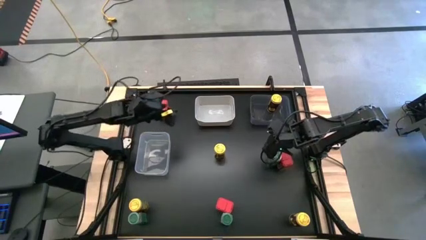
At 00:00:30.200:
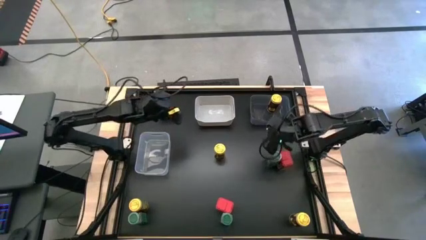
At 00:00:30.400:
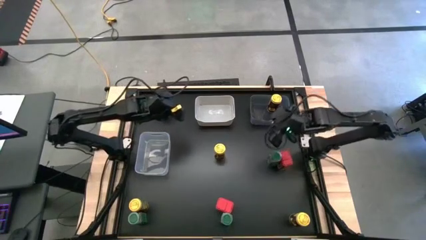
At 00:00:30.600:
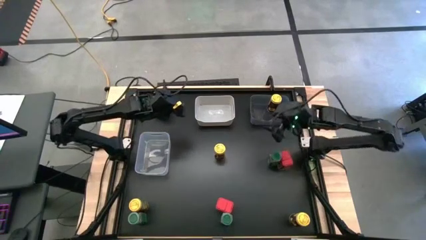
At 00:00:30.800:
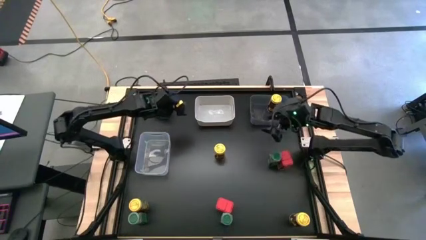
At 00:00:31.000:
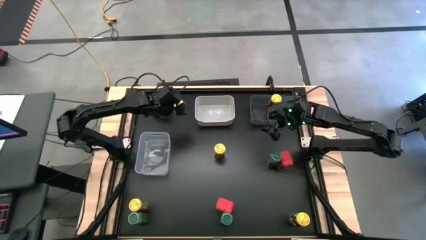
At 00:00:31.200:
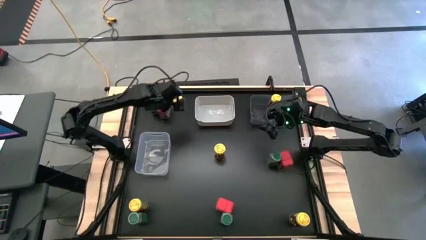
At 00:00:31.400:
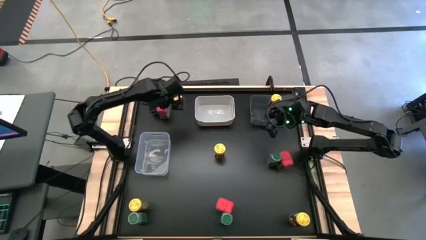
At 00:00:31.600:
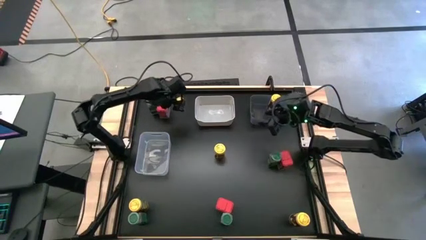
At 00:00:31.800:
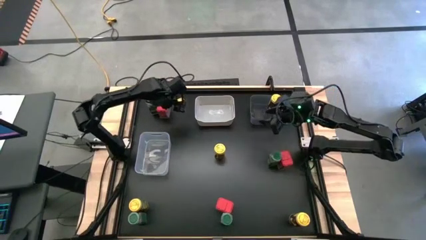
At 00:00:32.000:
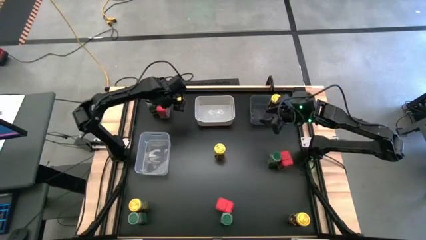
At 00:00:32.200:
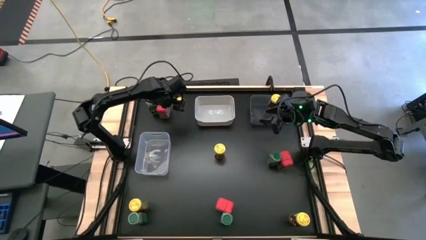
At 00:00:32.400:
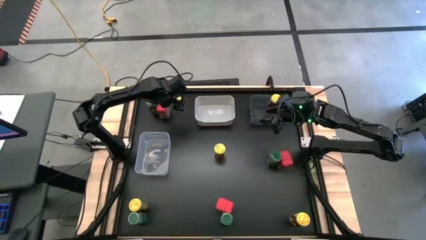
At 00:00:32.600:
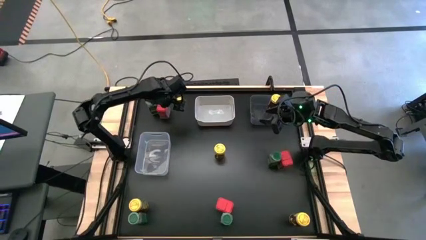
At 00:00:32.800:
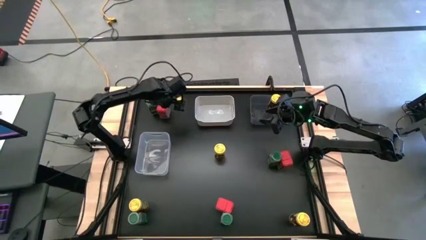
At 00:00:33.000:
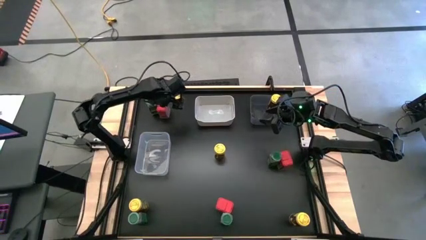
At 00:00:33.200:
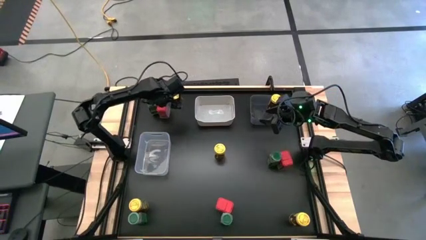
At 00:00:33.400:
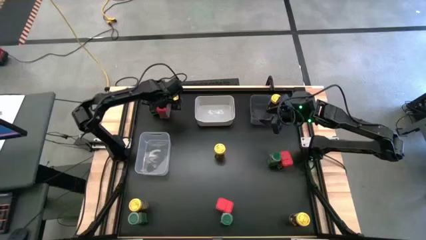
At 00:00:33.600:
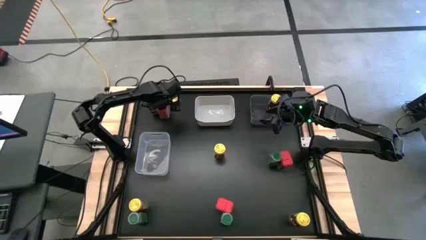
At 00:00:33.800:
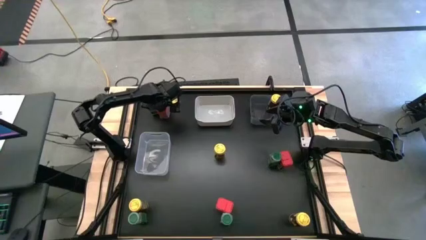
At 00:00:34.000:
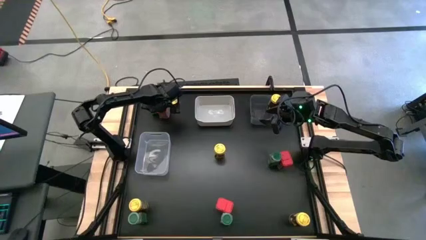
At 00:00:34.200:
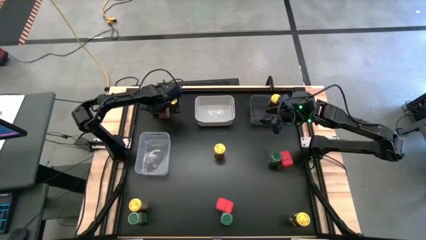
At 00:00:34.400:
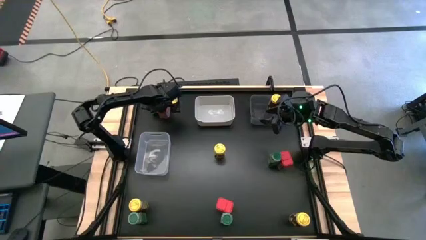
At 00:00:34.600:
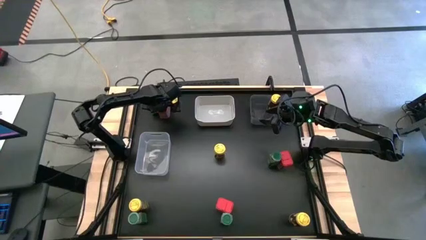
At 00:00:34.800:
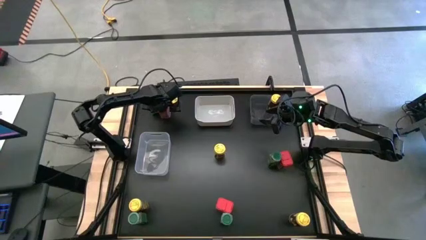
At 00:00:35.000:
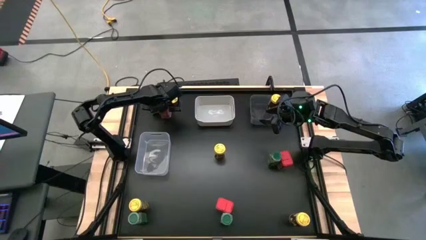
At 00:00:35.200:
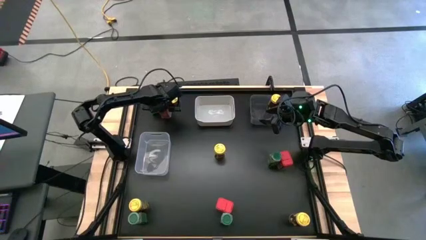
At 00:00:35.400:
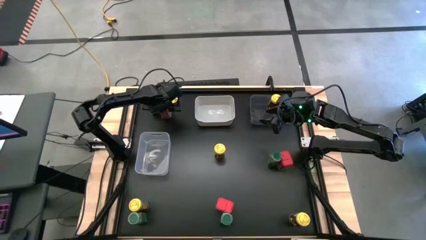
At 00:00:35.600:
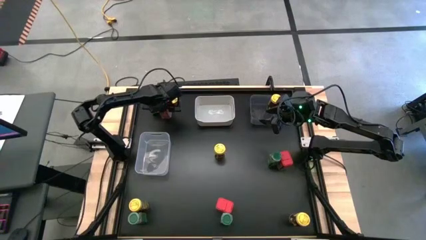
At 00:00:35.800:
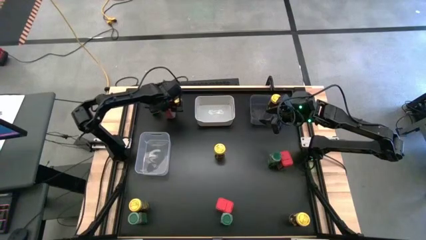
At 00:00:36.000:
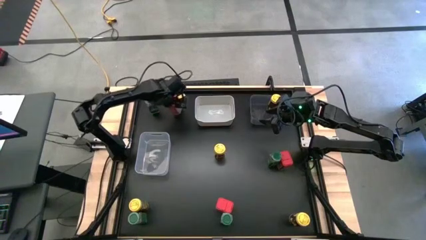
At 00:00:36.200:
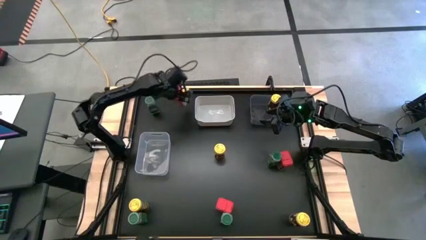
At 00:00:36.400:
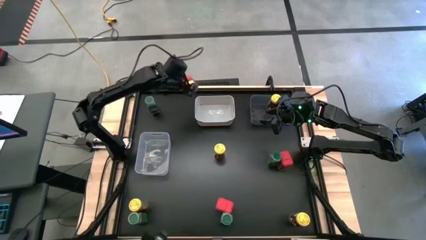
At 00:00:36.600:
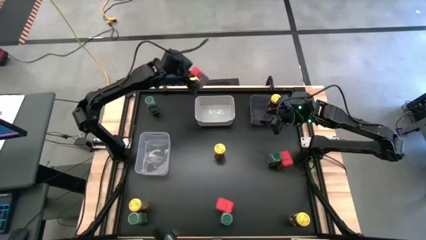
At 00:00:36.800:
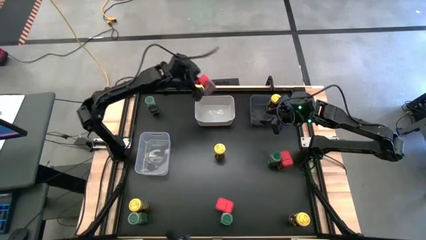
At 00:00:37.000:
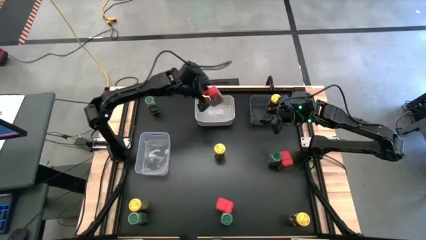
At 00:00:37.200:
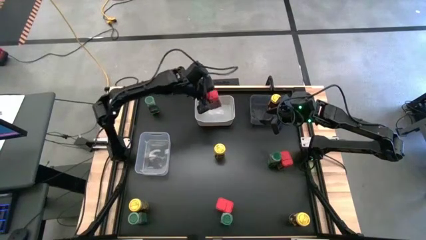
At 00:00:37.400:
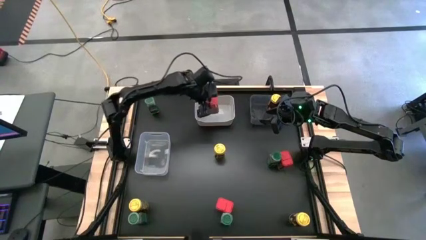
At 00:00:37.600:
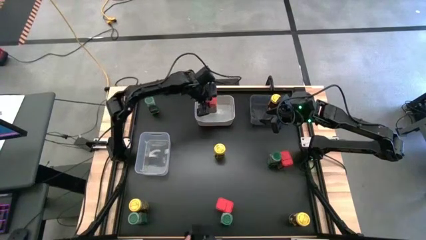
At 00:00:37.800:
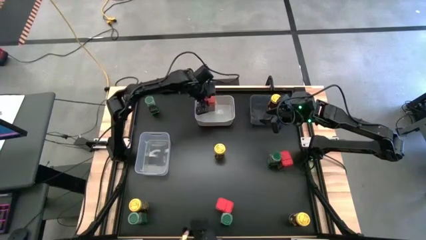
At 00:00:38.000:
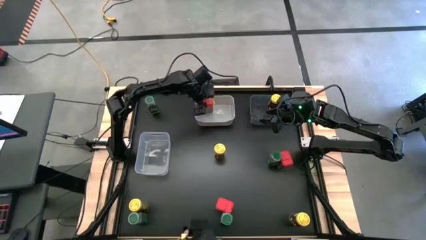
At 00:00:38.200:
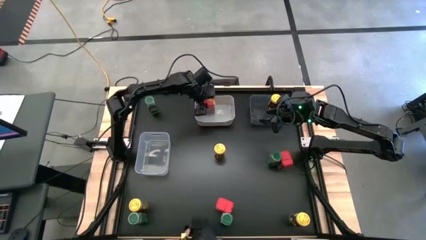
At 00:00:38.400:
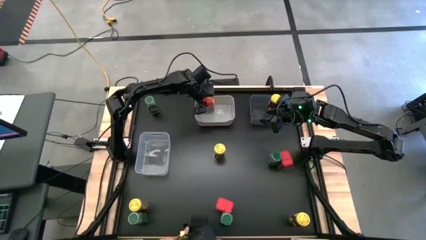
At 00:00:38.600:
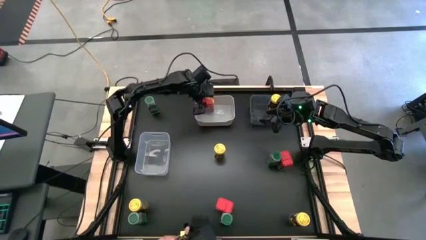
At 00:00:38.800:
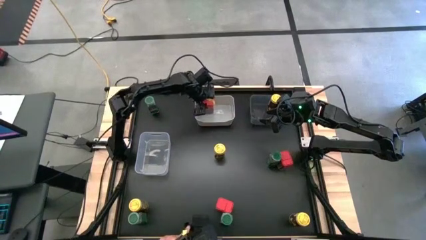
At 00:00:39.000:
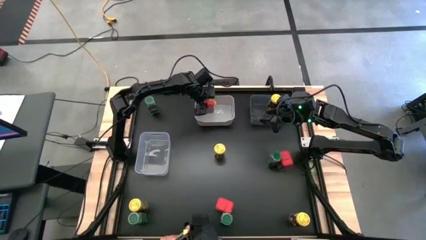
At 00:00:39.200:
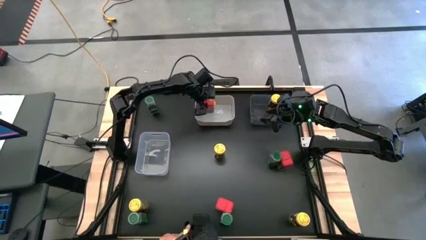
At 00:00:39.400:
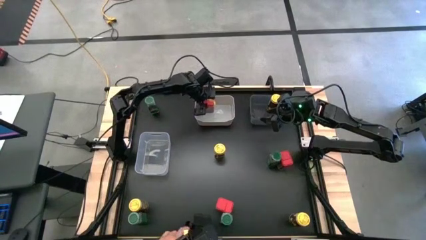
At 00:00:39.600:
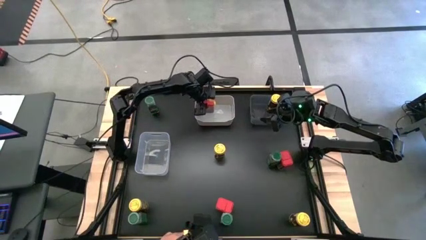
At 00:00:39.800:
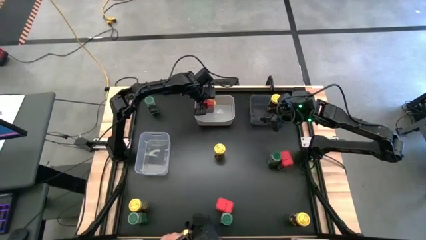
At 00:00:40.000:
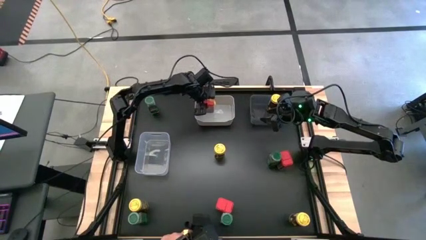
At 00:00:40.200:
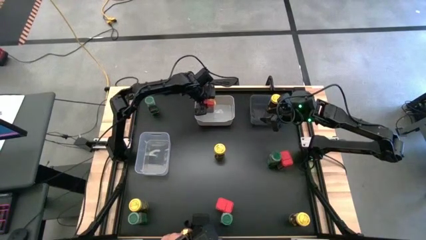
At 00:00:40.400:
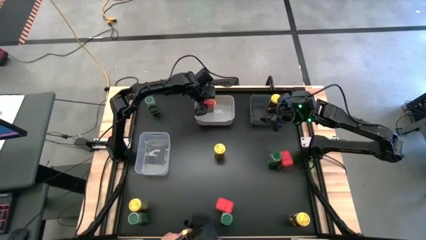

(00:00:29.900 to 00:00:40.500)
Task: Sort spices by type
Put the top left red seasoning can into the white bin

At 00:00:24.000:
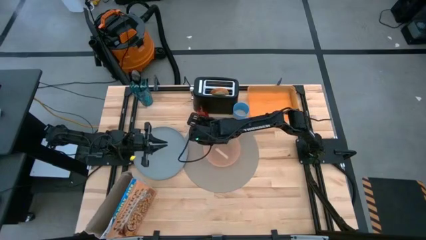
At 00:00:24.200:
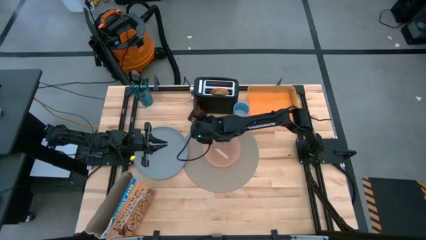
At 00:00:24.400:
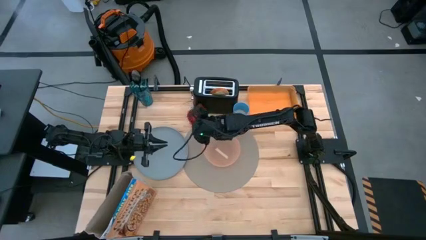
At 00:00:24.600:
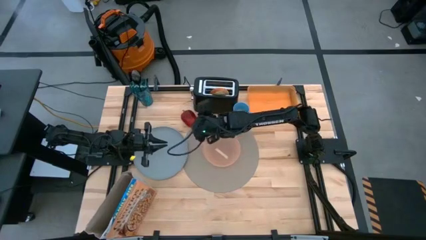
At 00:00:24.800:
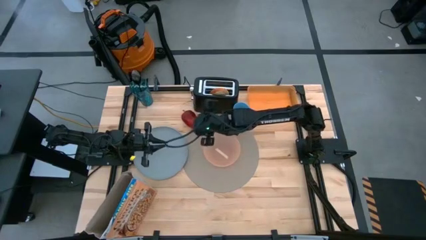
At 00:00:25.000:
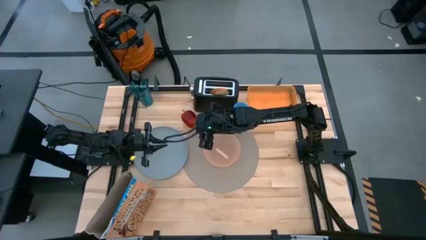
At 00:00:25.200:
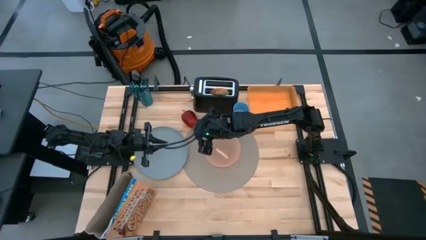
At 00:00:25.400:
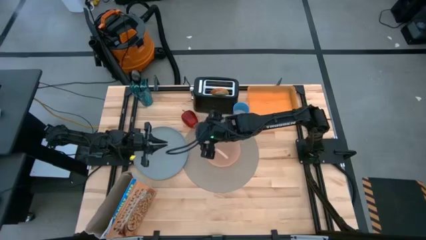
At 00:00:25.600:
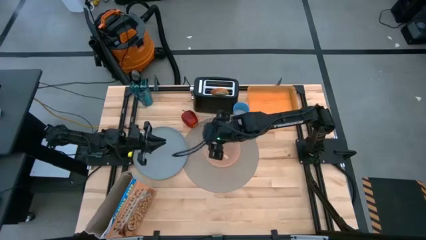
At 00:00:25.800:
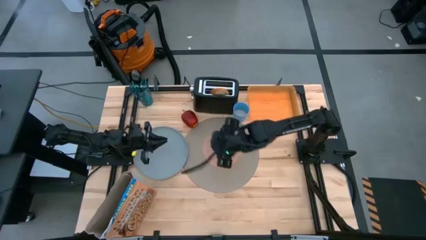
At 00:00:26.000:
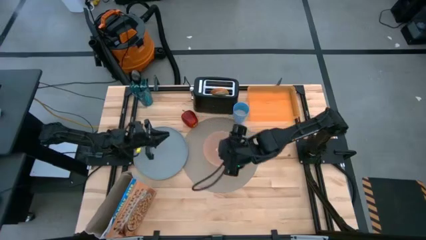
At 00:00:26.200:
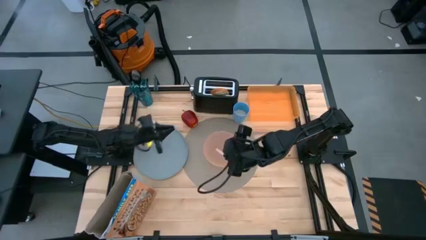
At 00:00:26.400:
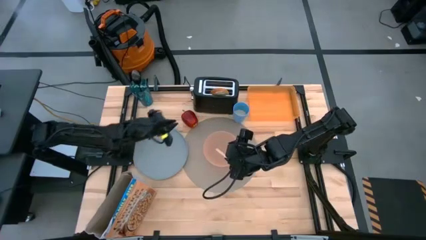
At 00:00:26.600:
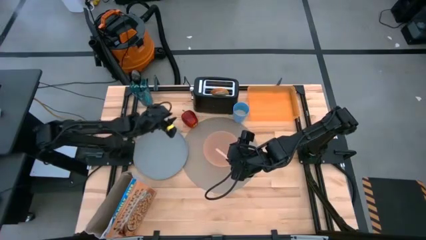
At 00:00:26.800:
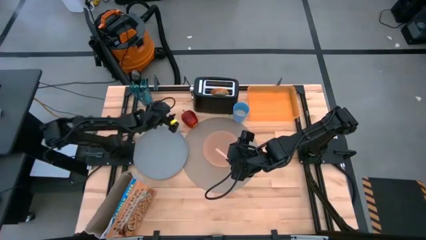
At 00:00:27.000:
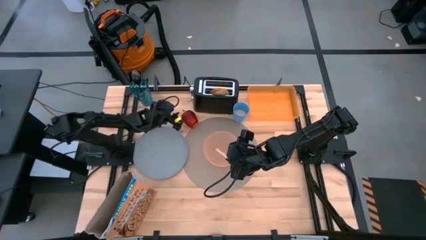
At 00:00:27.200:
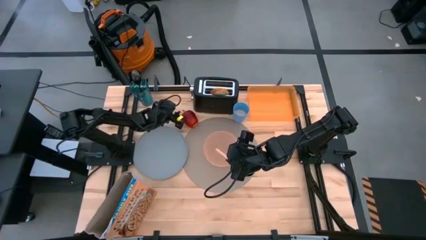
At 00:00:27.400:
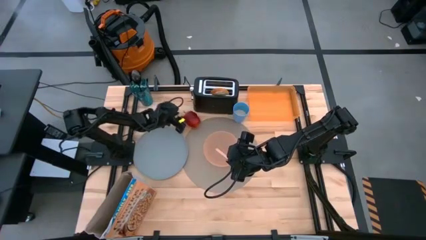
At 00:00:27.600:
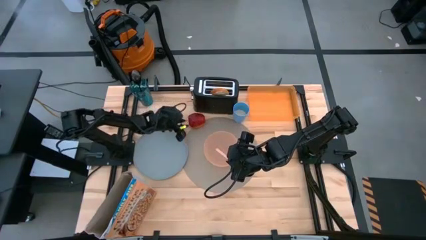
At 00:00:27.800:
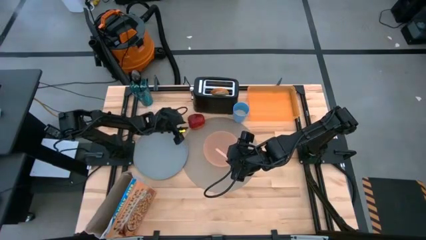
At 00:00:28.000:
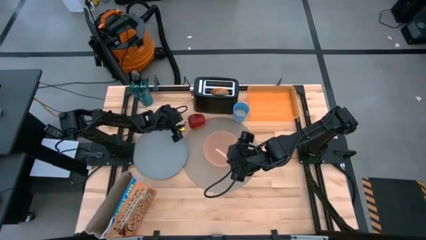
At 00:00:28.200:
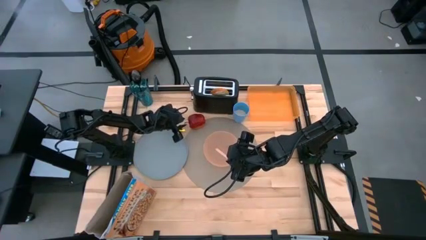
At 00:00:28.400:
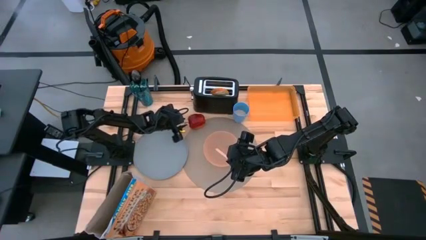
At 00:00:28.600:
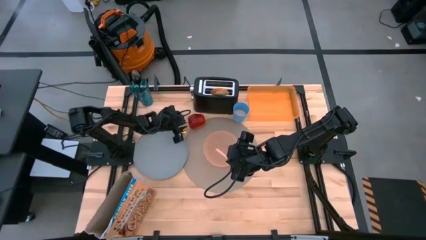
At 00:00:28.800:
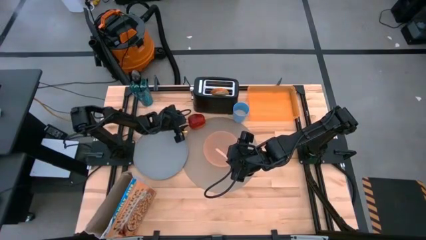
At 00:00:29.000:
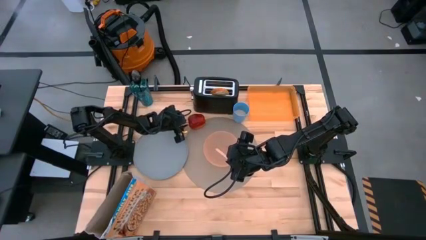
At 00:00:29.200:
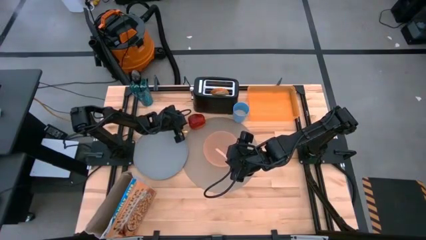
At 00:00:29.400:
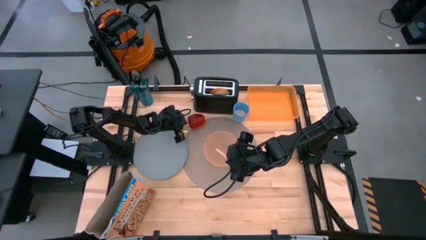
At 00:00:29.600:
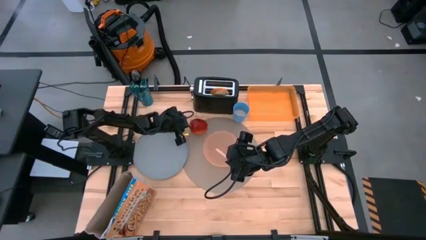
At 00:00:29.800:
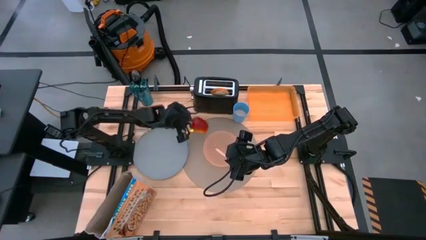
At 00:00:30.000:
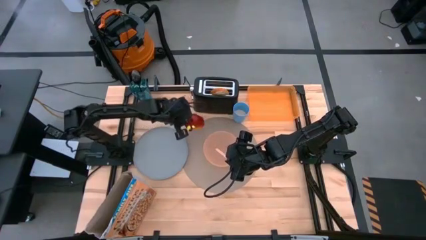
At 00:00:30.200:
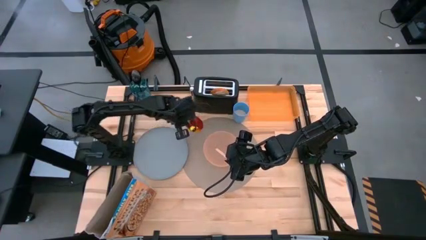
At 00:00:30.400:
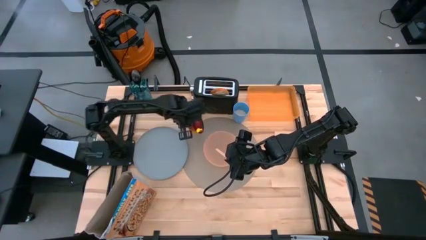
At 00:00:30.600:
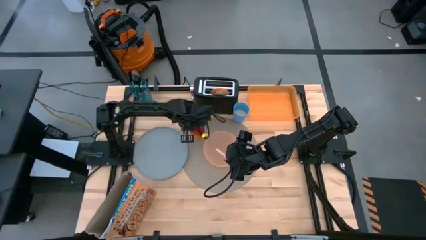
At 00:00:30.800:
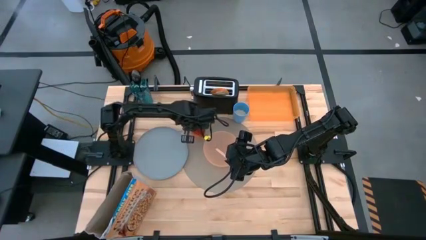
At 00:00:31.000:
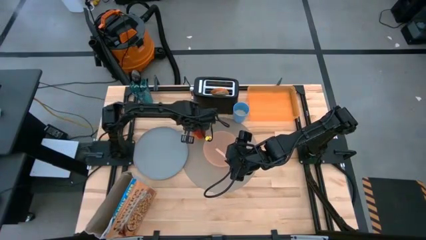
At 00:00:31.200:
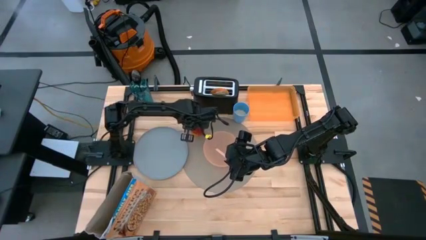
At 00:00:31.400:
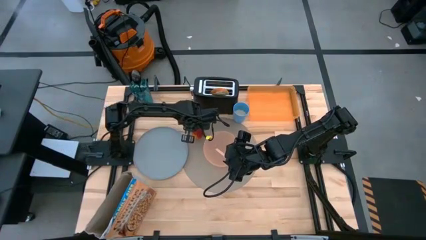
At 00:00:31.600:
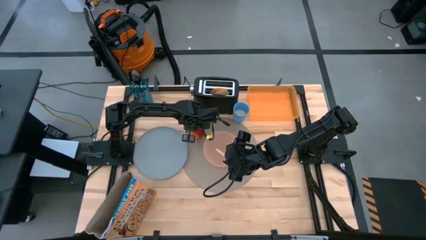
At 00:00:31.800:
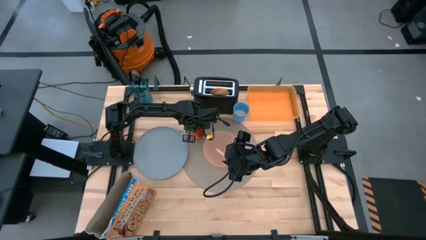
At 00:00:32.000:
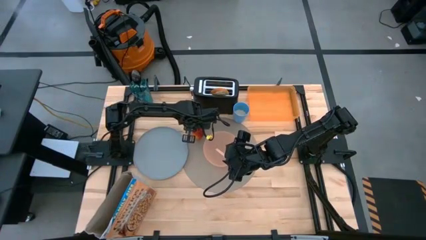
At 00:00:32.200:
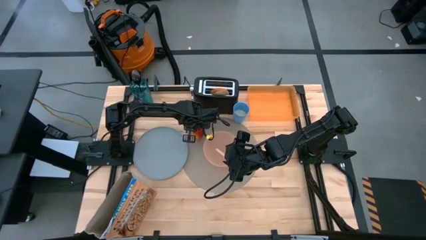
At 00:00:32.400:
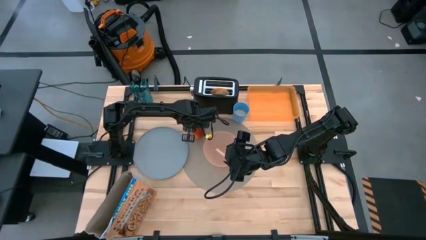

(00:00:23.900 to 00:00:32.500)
Task: Arrange a breakfast setting
Put the apple to the top left of the gray placemat
